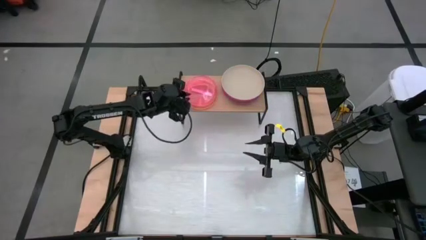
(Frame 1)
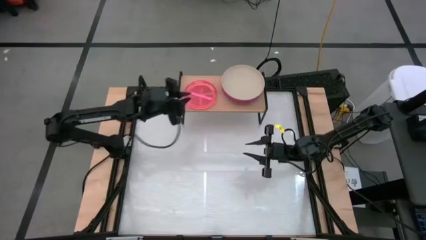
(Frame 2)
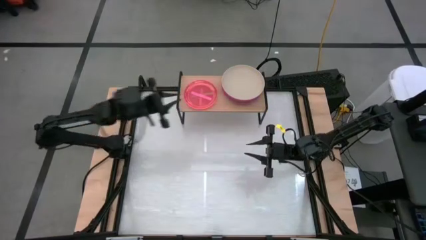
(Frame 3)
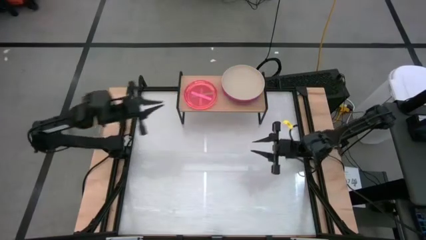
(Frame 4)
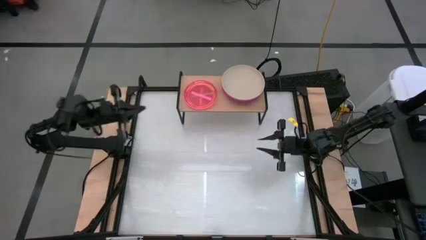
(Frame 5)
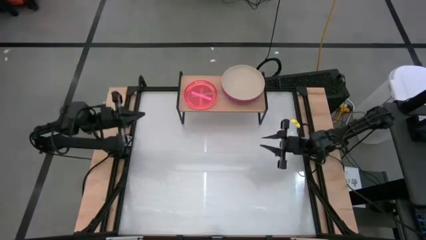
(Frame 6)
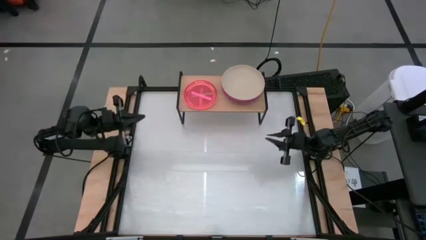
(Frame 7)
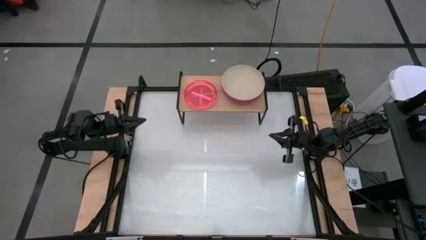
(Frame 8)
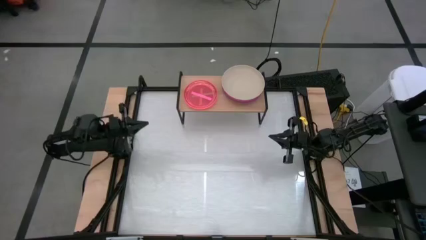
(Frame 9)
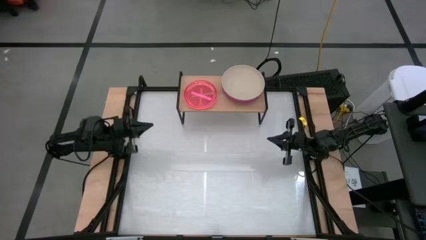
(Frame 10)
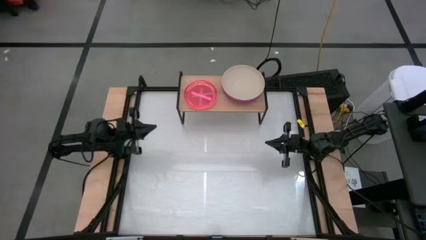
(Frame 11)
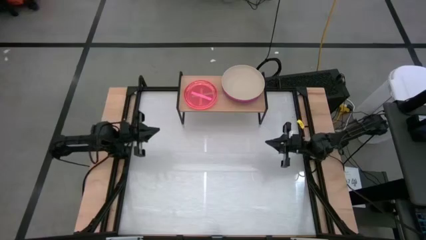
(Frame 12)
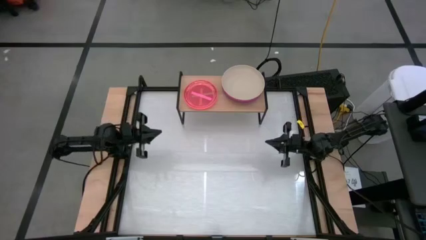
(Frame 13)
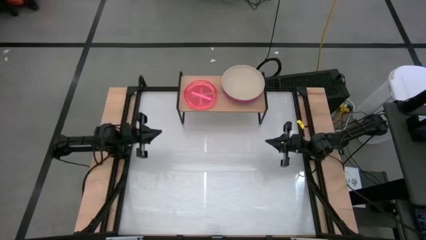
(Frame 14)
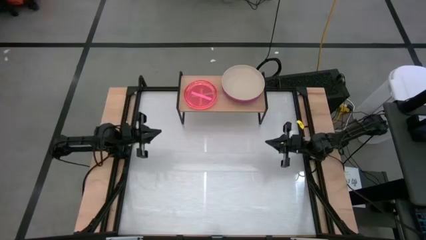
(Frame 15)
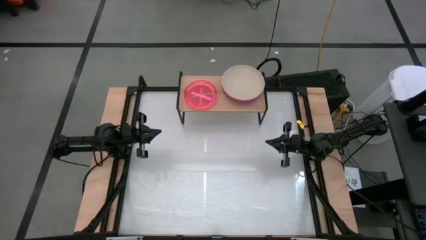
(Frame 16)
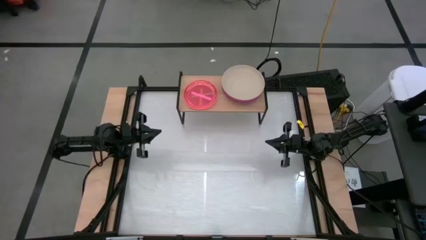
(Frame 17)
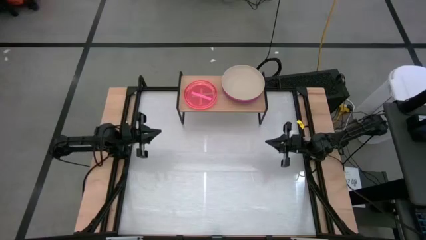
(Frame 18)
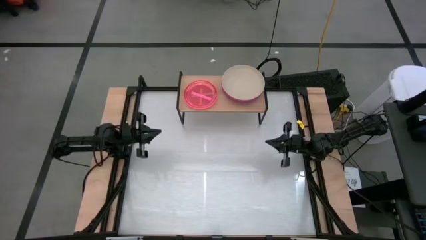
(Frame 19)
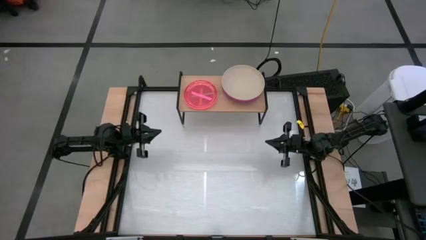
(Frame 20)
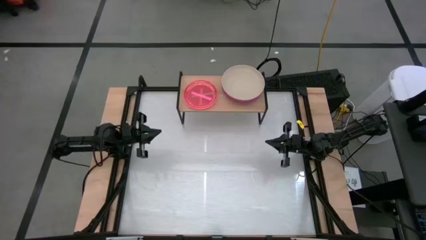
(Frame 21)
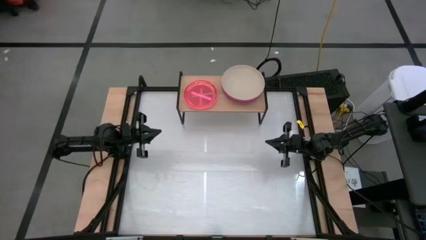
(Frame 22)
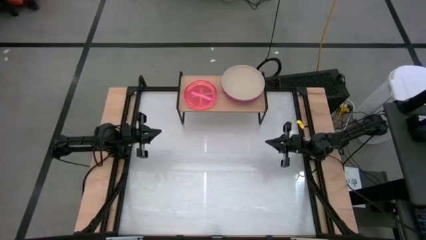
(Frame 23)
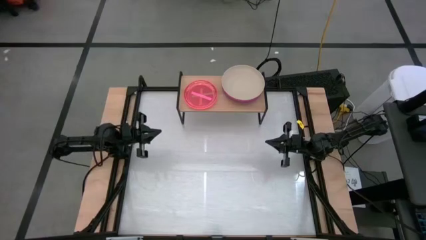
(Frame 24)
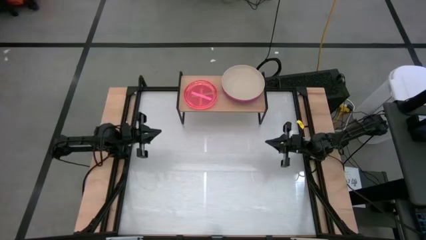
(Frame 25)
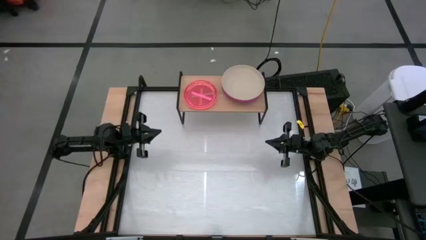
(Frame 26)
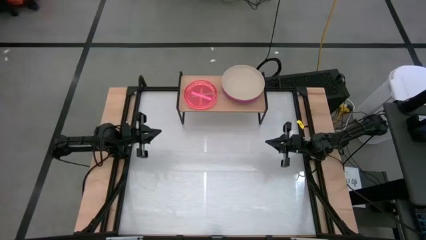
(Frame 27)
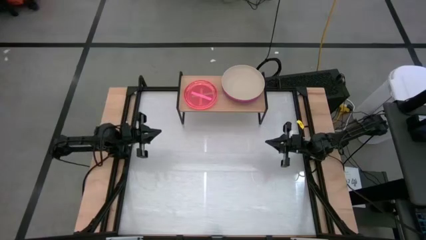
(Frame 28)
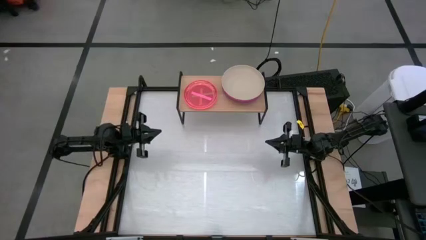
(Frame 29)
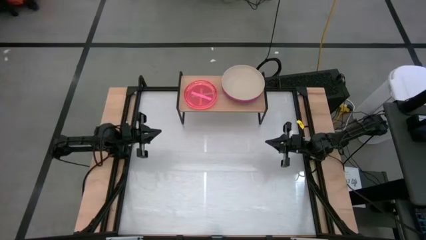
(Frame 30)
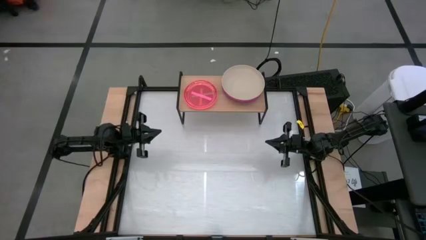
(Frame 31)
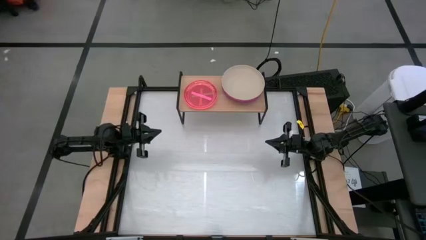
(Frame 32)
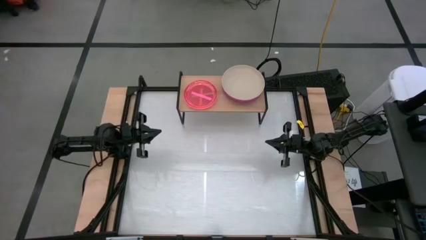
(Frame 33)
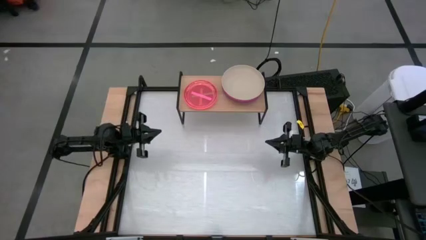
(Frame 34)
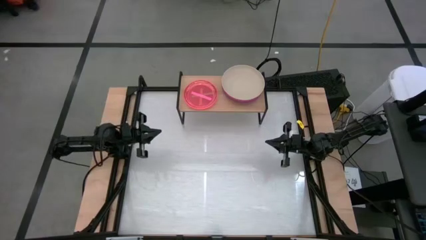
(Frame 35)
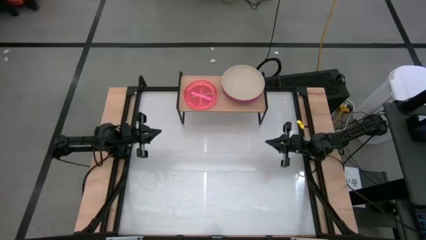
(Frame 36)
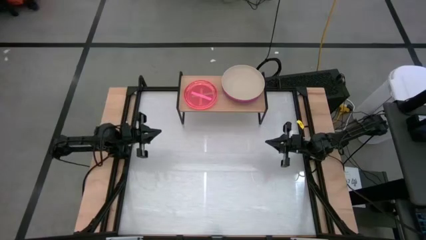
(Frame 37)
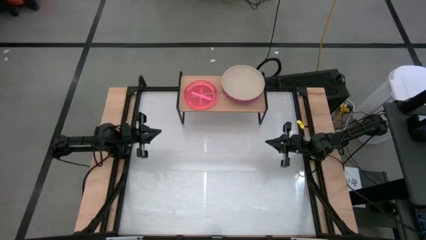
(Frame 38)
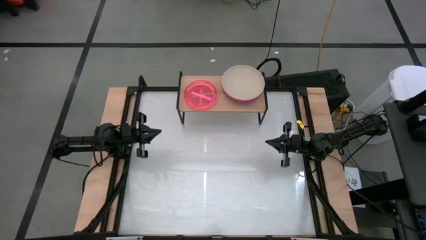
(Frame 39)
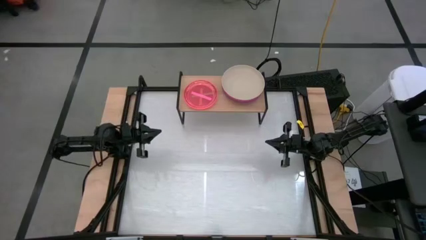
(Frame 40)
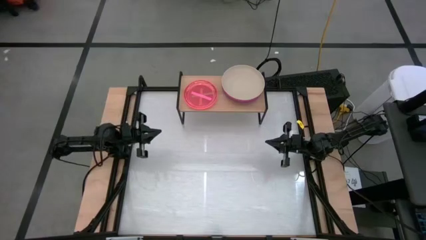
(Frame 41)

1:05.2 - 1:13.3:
Task: Place and stack plates onto a shelf
Return to Home Position

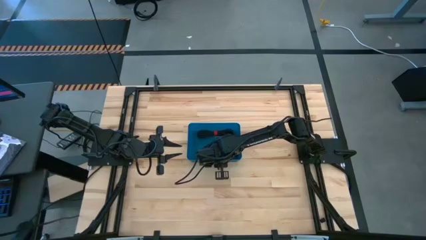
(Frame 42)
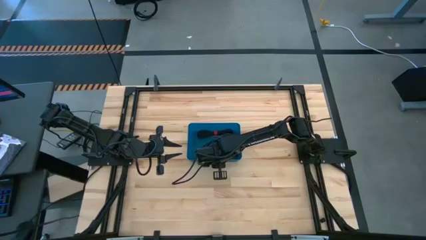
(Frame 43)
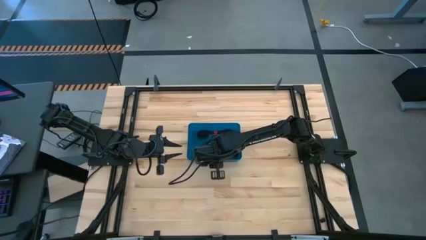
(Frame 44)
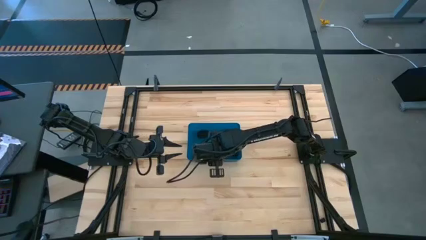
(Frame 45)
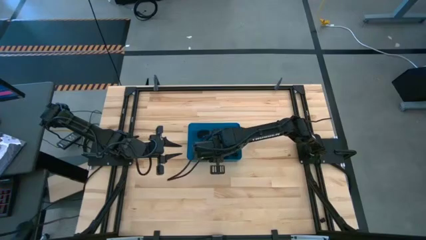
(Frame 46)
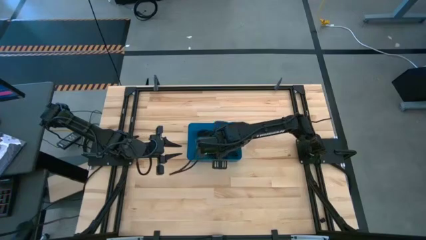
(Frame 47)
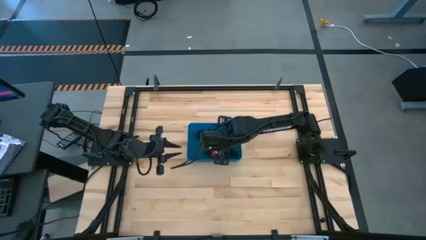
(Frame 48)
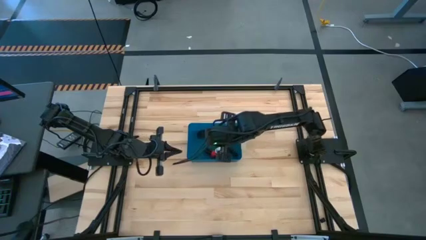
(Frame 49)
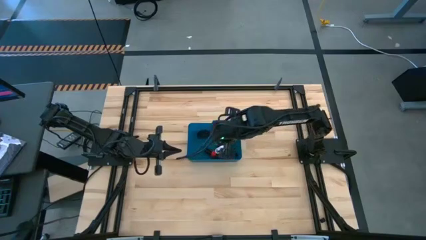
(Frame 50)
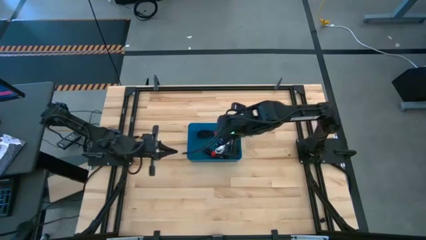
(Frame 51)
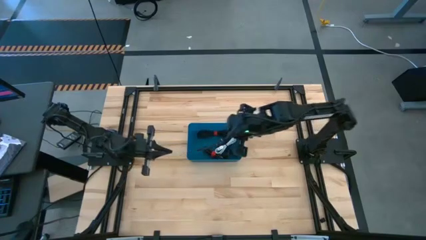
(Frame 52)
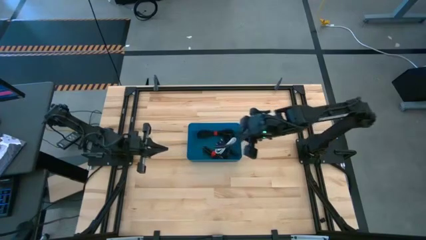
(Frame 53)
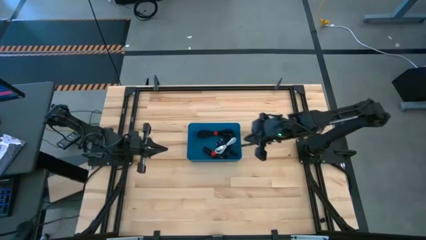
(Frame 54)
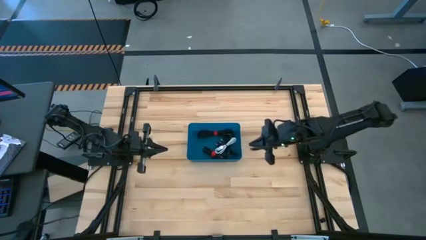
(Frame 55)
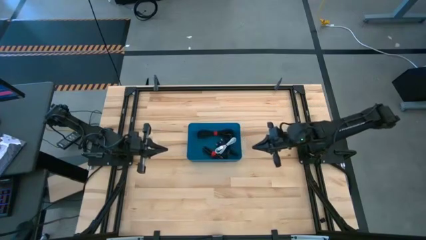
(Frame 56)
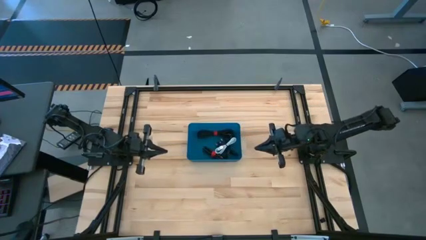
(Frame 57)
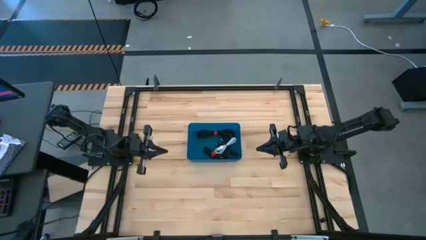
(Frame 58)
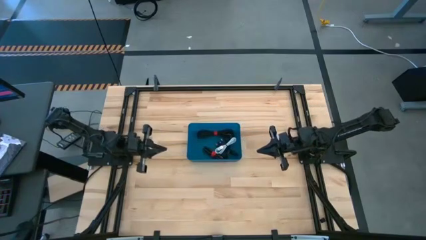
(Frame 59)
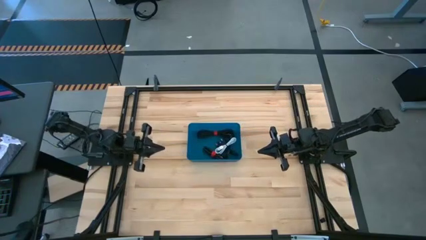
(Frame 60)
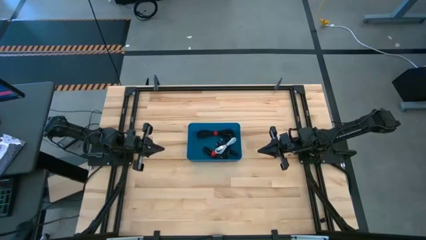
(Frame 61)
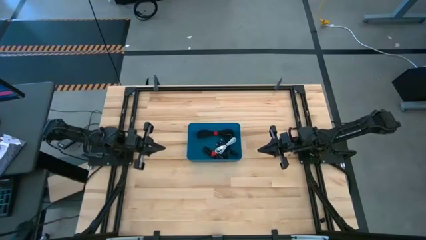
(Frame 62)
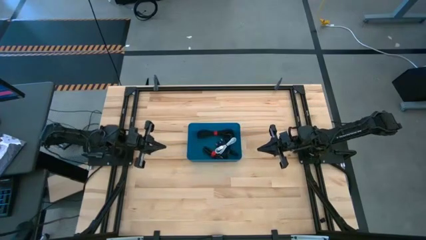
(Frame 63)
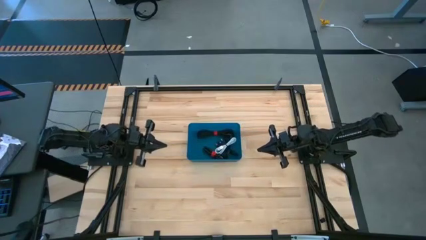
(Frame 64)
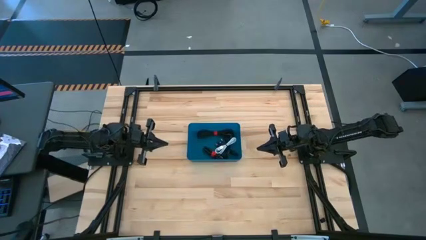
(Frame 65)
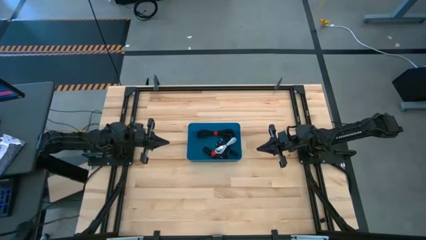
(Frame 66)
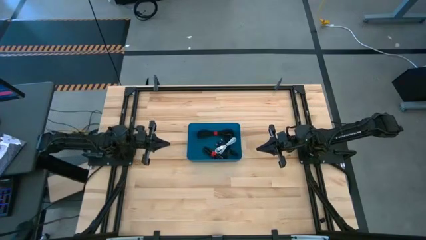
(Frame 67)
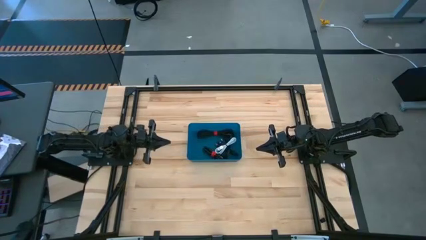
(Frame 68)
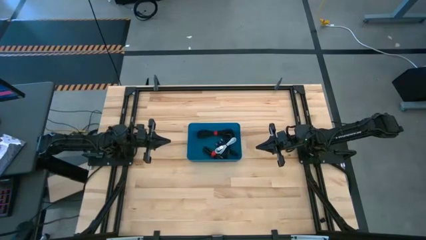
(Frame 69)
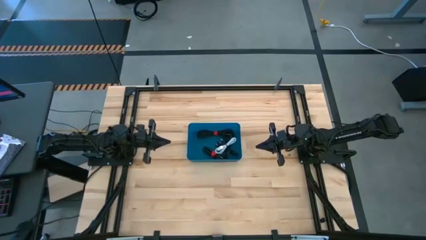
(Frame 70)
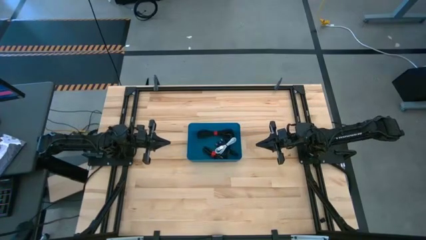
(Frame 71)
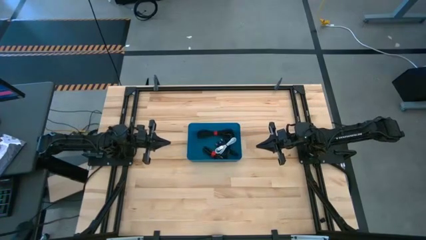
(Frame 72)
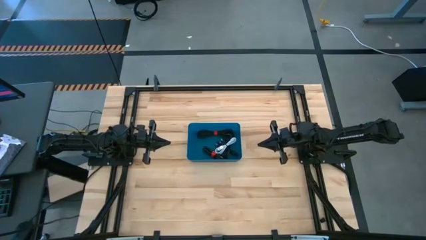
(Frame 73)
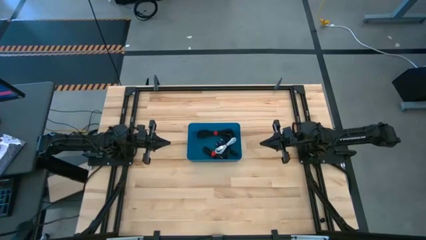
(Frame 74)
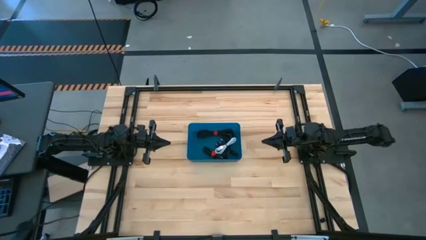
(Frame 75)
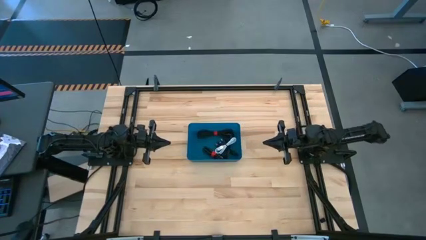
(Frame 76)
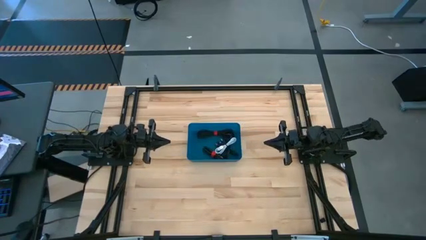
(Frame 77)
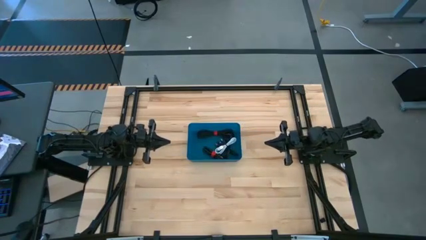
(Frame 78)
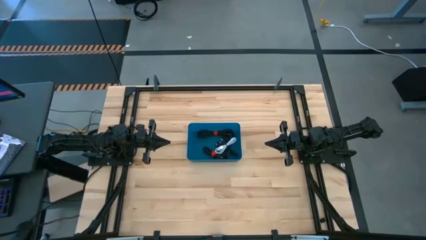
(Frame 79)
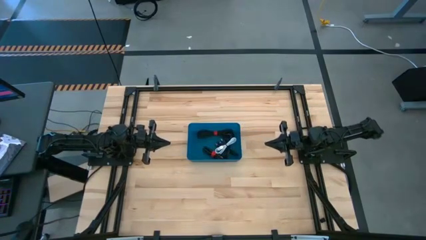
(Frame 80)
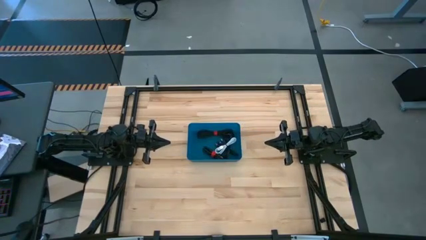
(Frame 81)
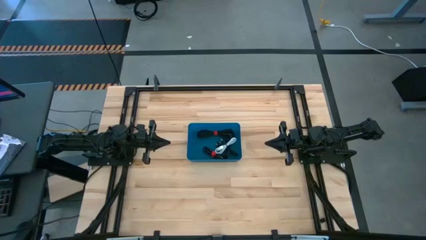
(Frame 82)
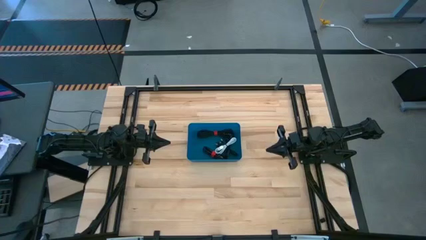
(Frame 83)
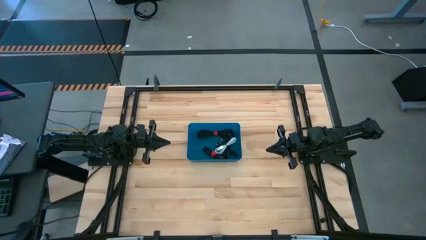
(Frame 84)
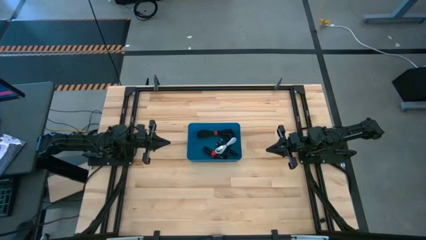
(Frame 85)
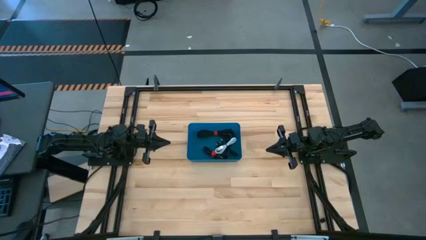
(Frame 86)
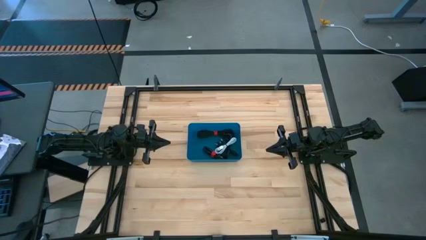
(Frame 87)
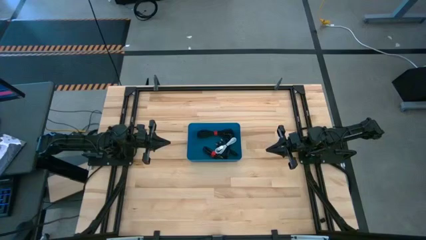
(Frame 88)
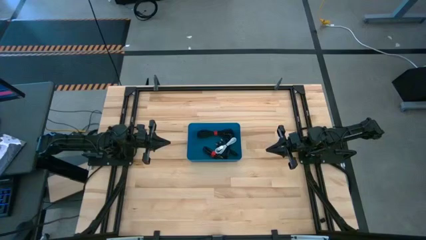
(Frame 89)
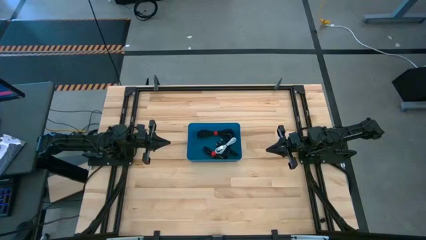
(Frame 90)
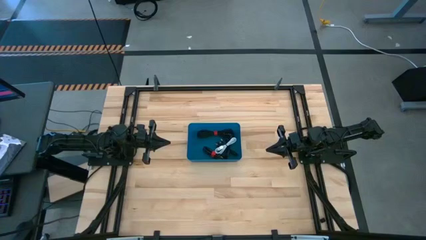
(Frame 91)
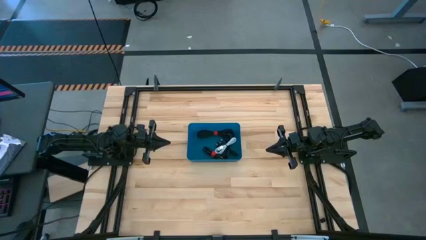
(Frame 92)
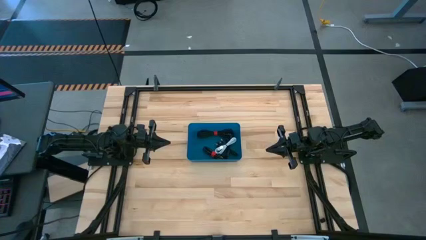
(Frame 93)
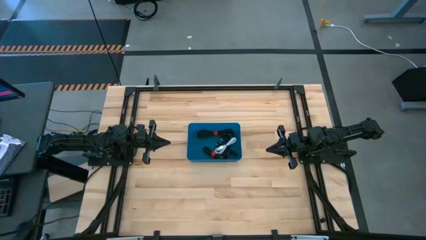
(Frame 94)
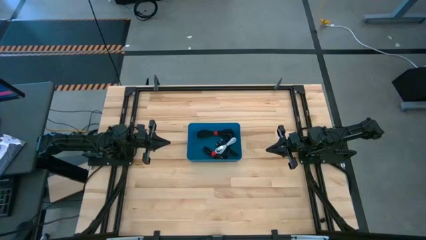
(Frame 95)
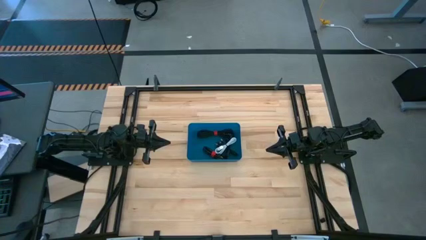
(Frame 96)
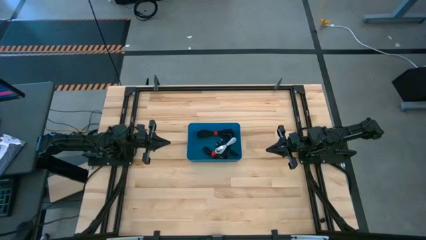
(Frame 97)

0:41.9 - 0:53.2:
Task: Pick and place USB-C Cables
Return to Home Position
